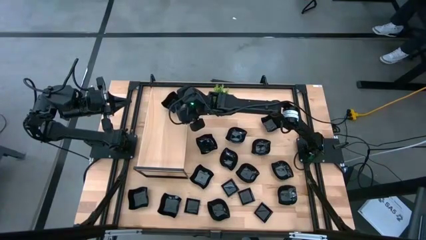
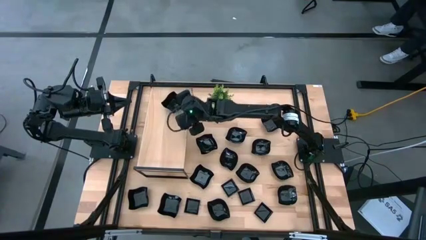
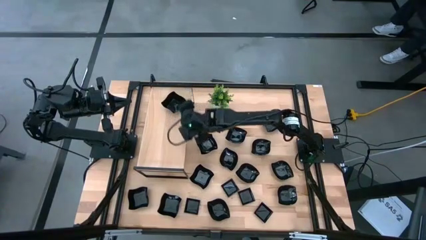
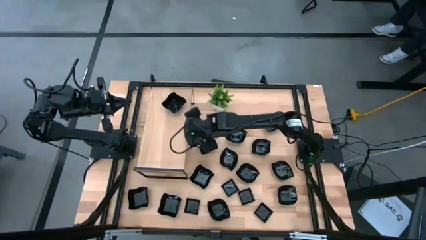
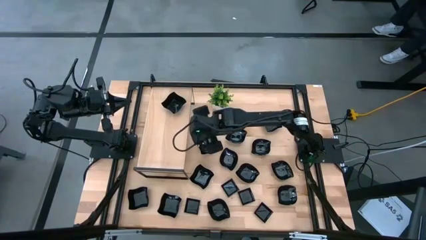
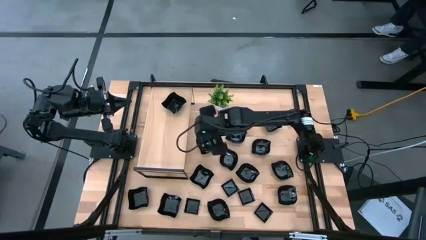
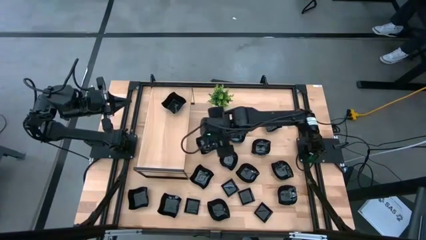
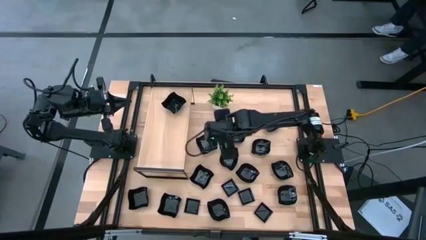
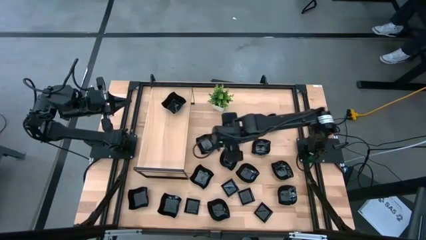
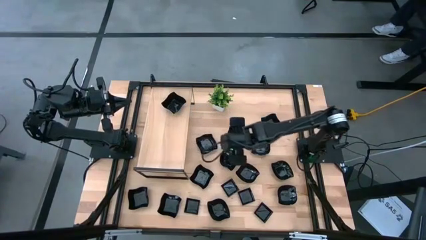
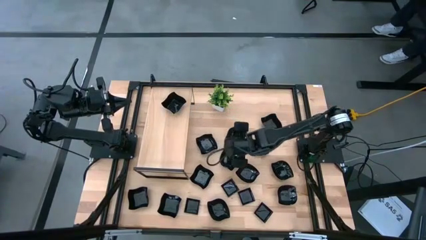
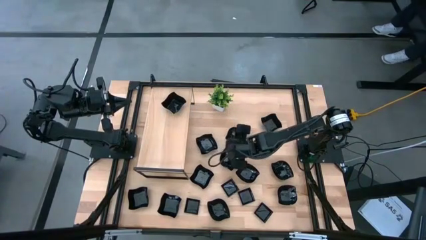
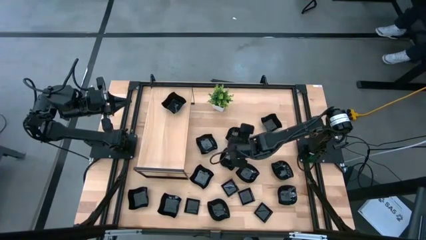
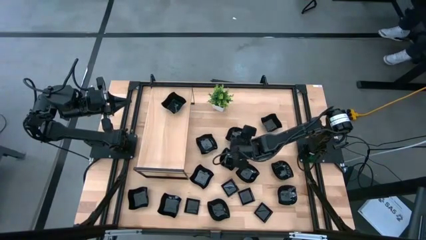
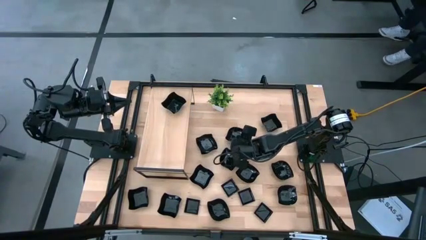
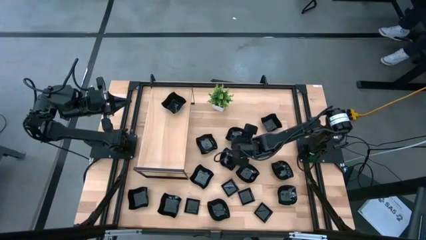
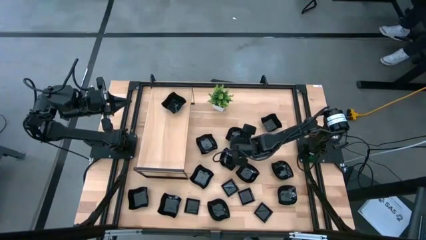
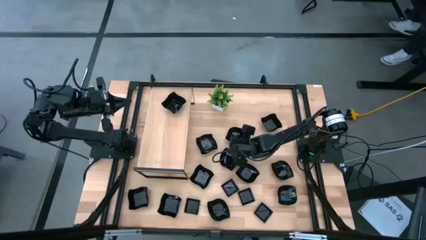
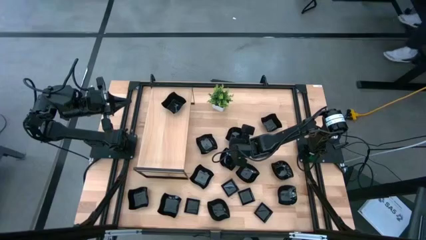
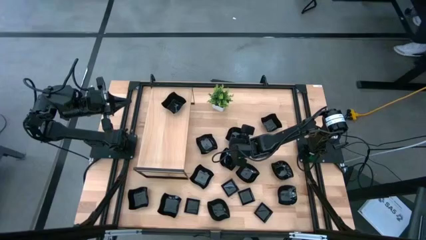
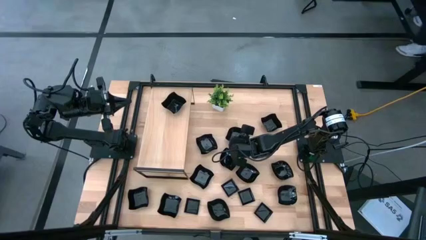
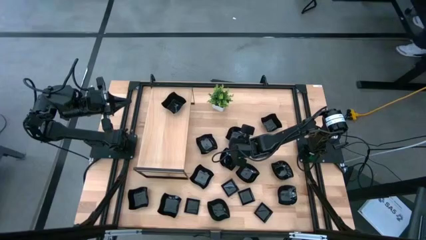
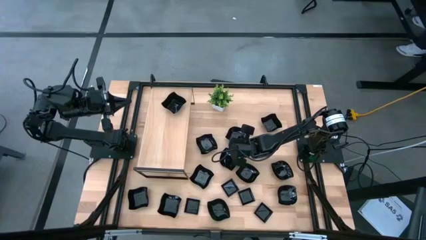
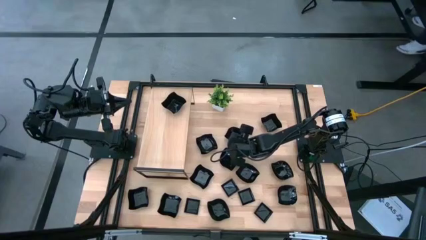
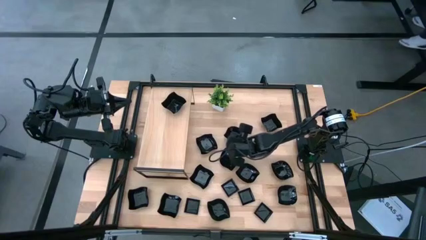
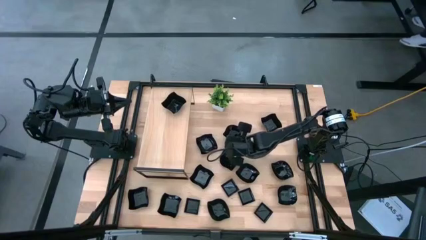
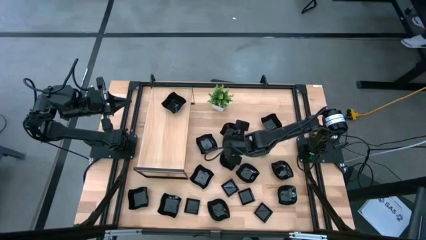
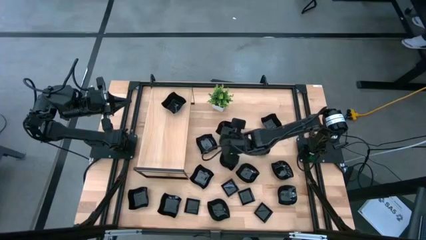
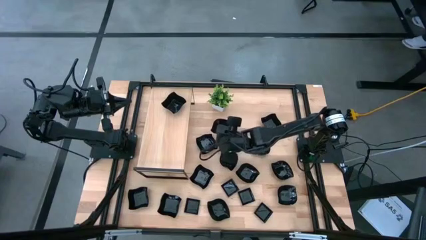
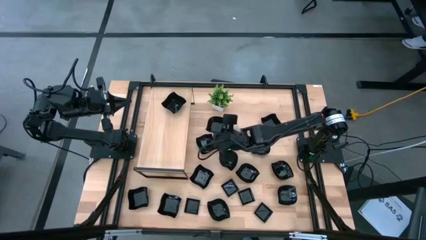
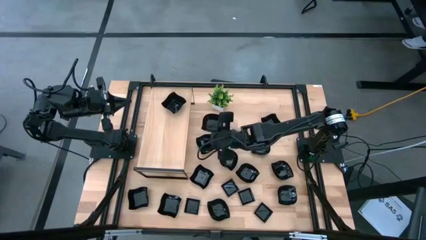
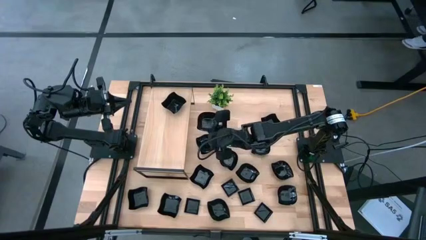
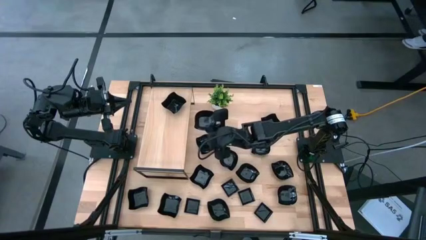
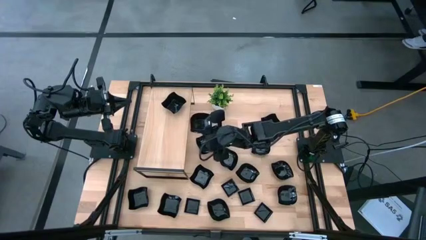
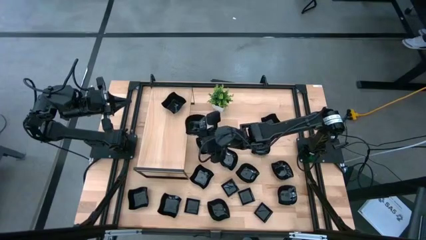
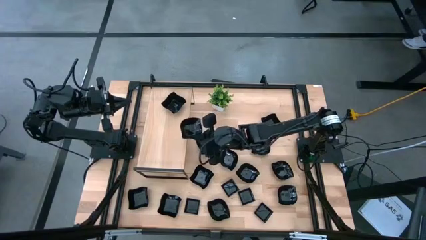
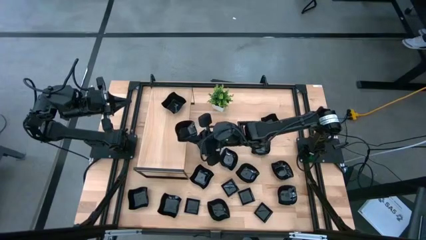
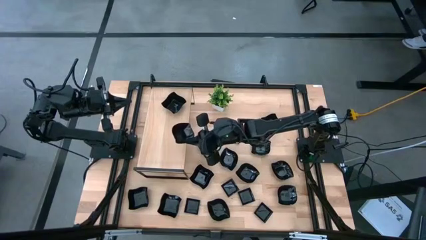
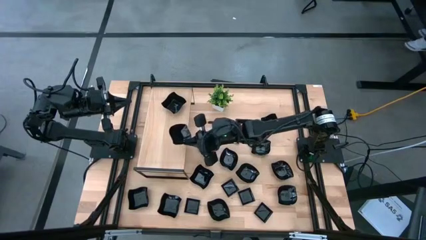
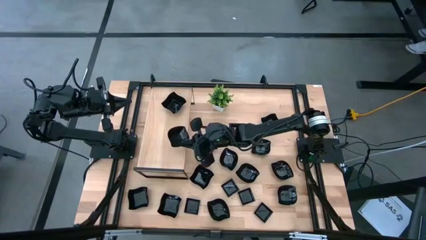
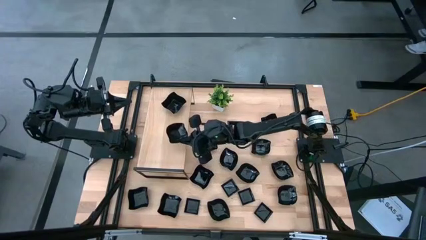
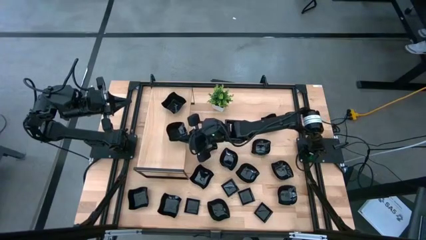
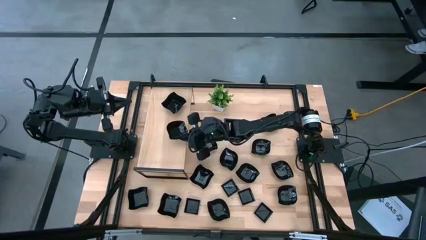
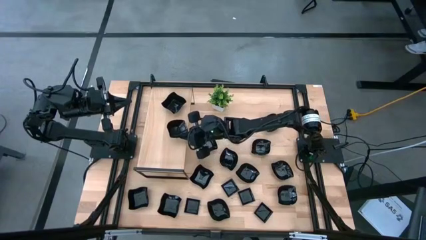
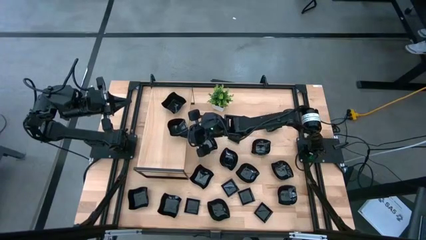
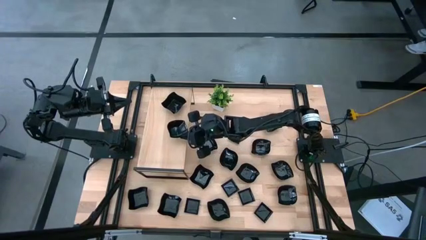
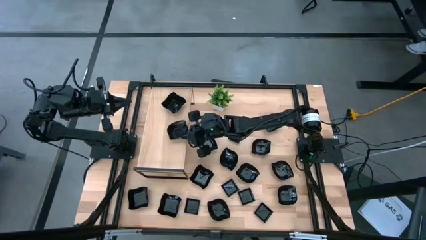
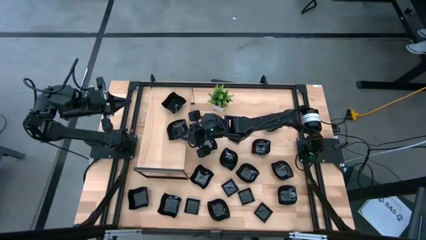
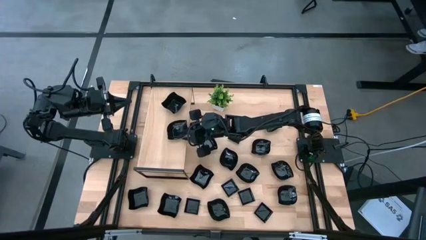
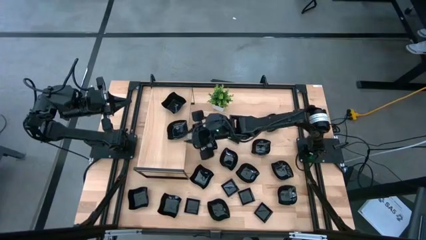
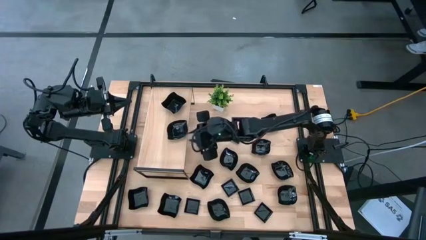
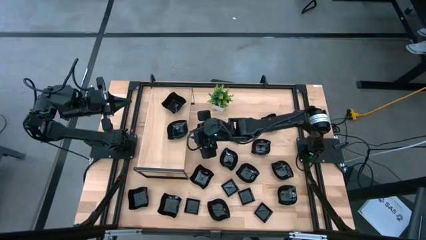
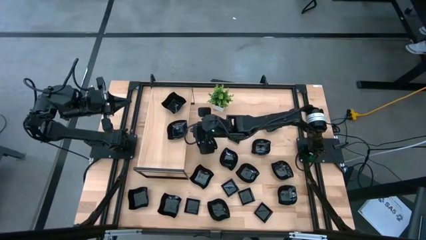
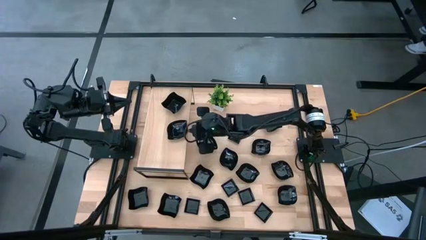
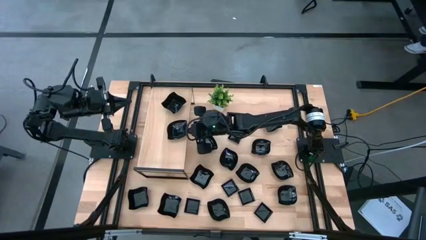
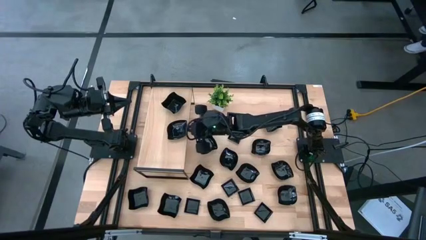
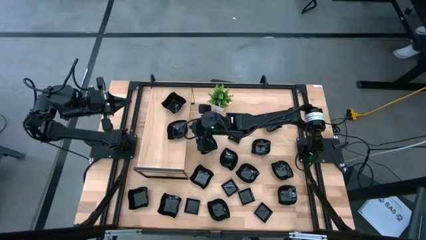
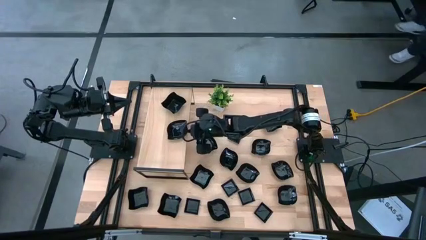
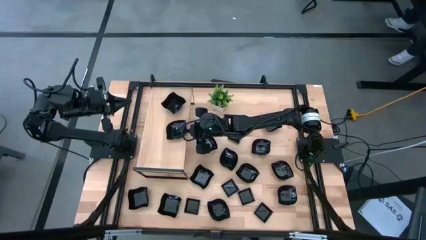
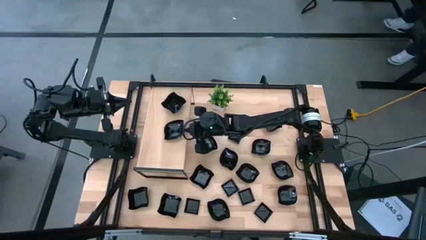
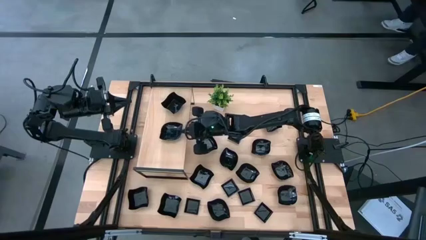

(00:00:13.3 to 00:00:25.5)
Task: Pick & Place Mini shaped plates
Put the black leaf shape plate on top of the shelf
